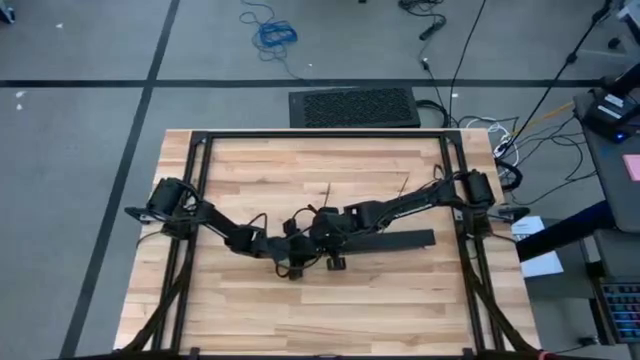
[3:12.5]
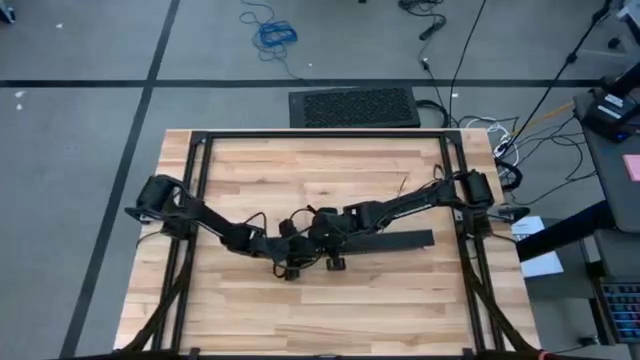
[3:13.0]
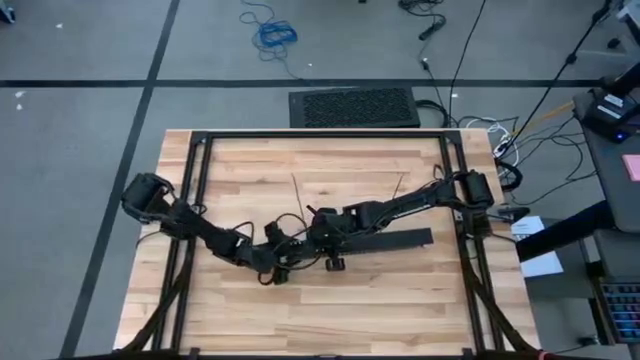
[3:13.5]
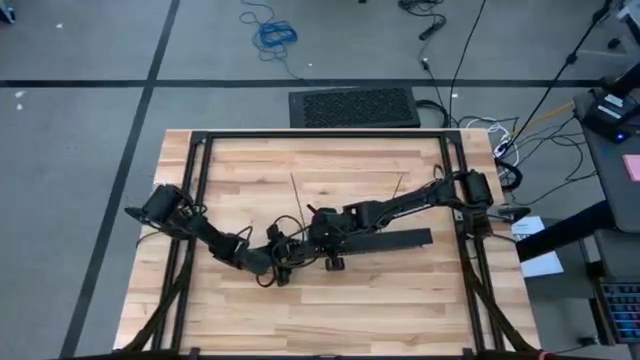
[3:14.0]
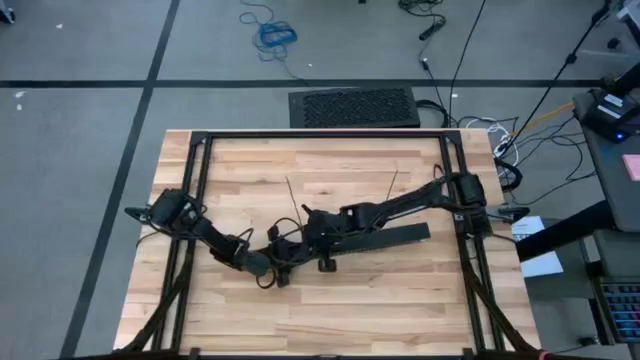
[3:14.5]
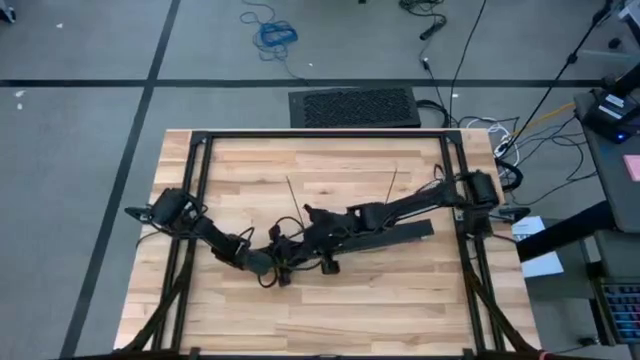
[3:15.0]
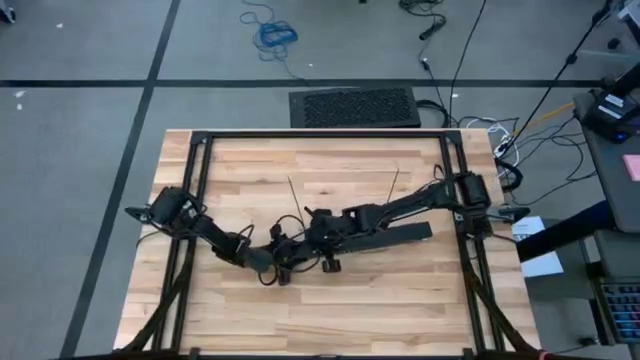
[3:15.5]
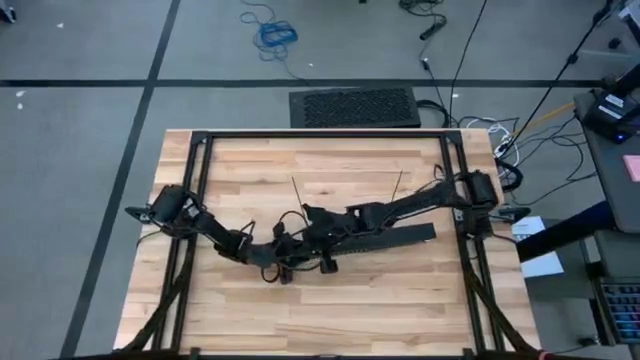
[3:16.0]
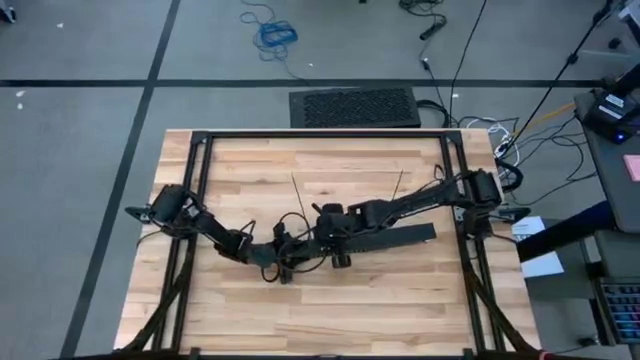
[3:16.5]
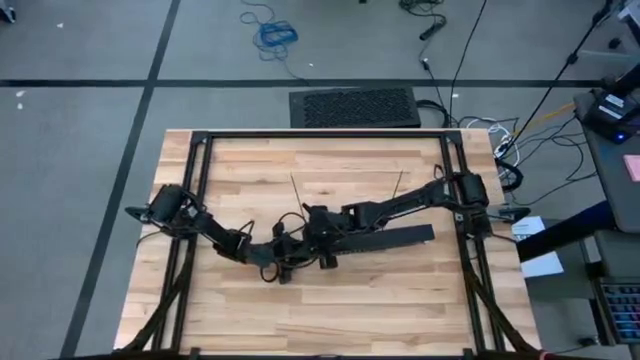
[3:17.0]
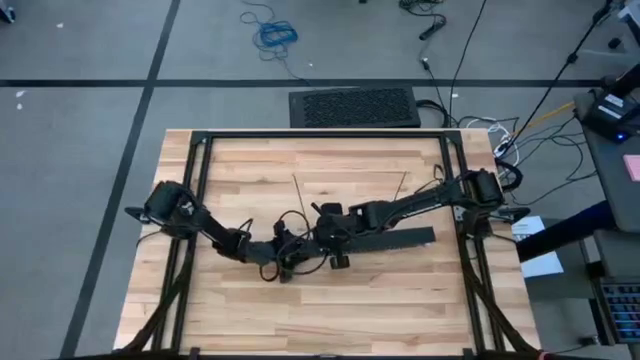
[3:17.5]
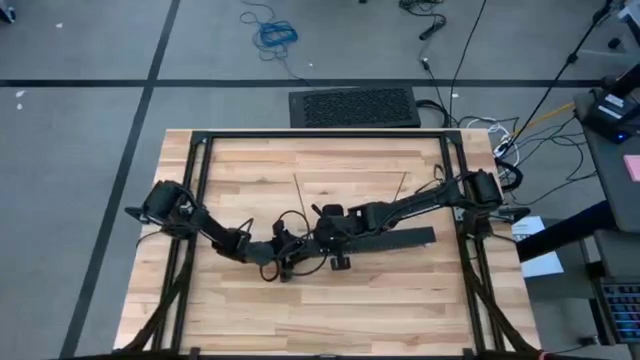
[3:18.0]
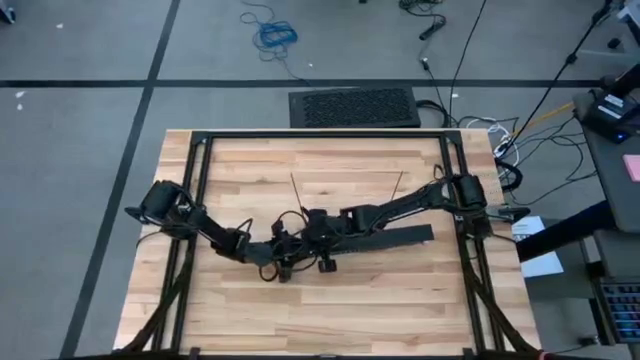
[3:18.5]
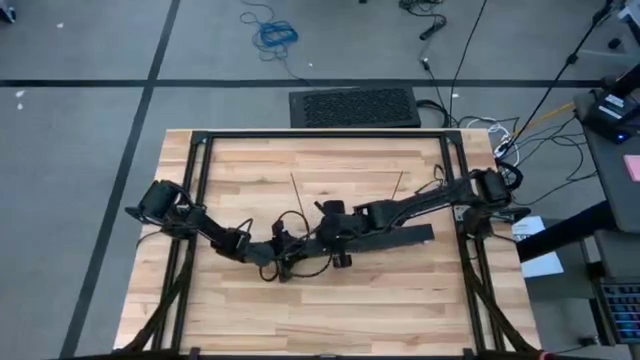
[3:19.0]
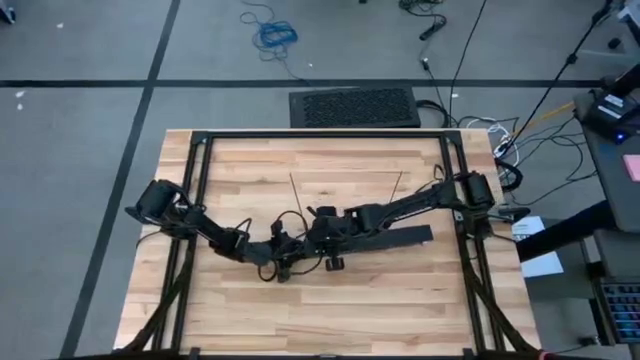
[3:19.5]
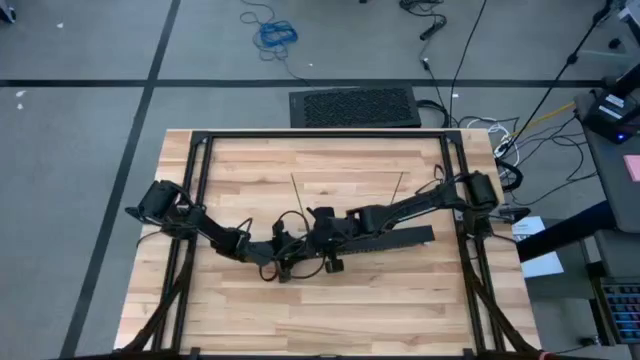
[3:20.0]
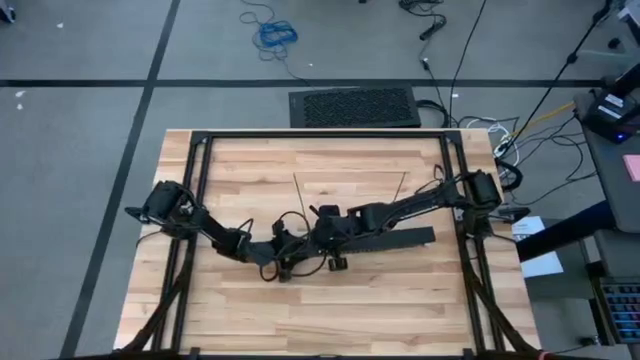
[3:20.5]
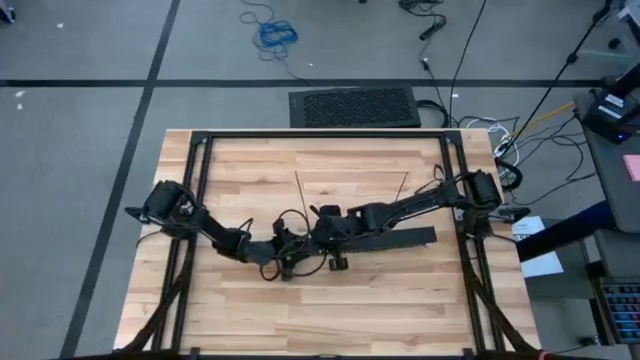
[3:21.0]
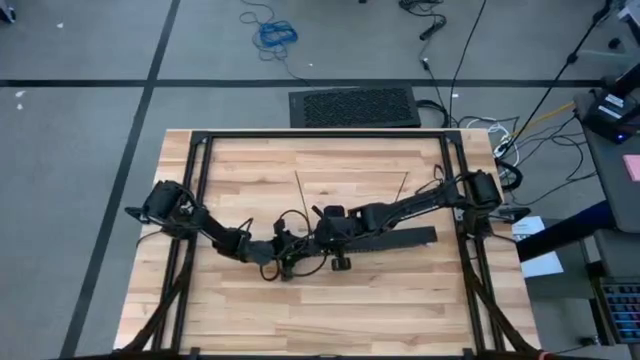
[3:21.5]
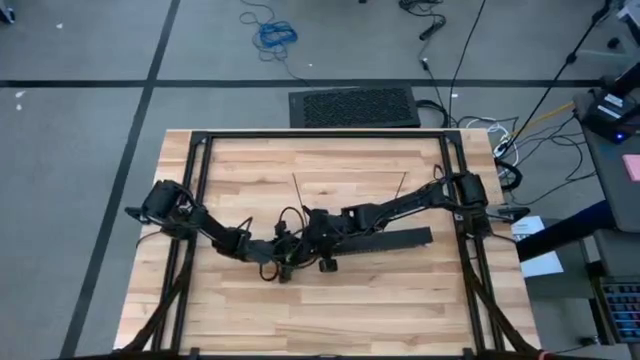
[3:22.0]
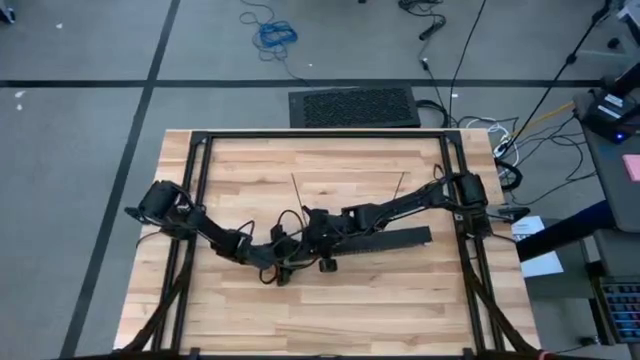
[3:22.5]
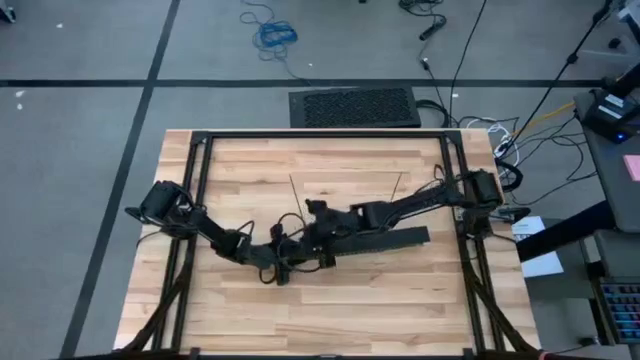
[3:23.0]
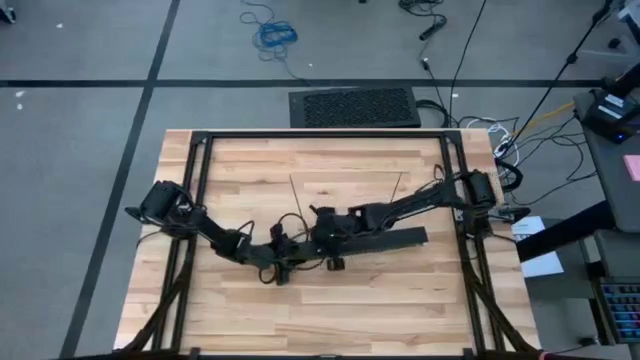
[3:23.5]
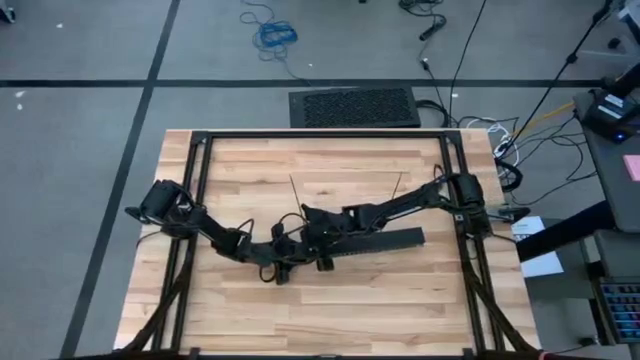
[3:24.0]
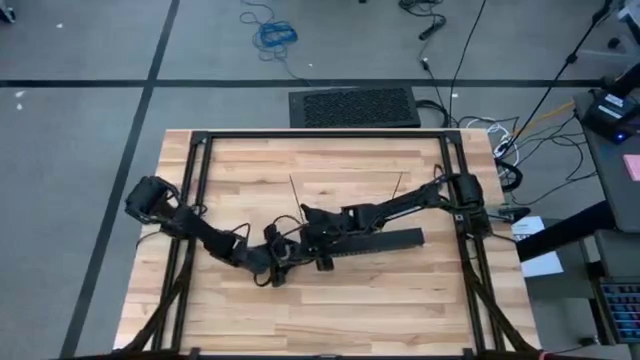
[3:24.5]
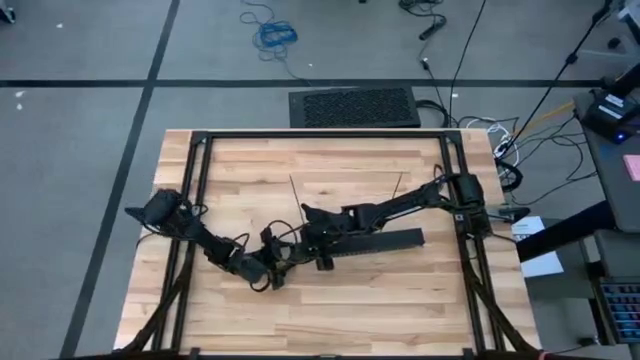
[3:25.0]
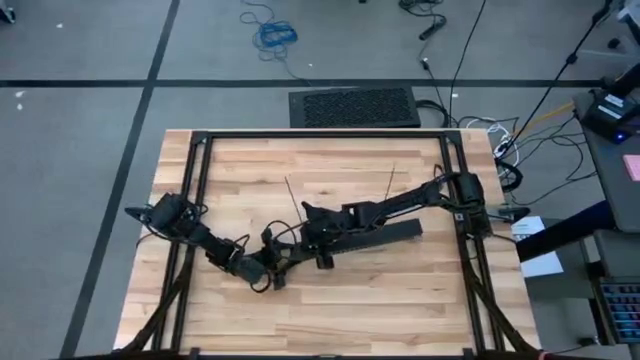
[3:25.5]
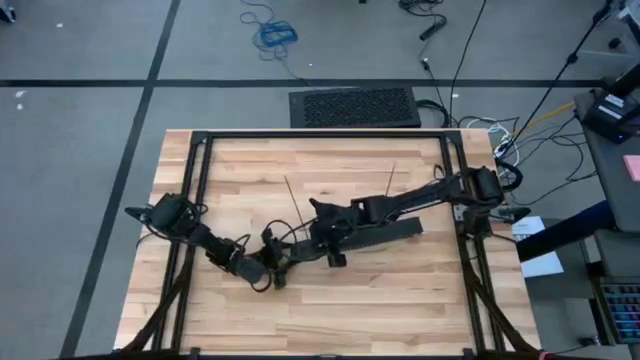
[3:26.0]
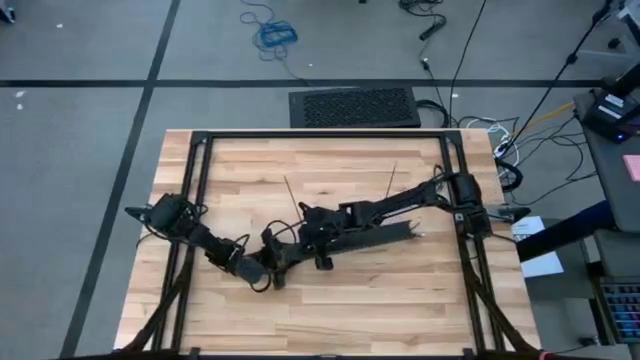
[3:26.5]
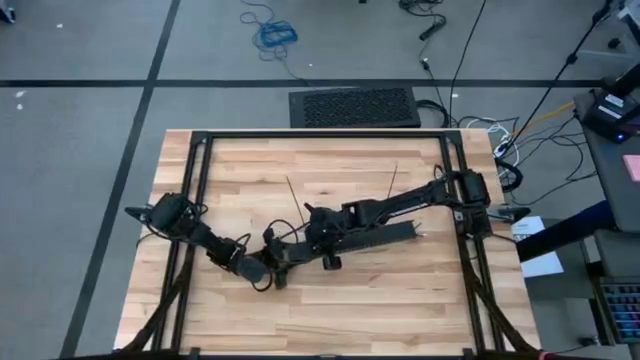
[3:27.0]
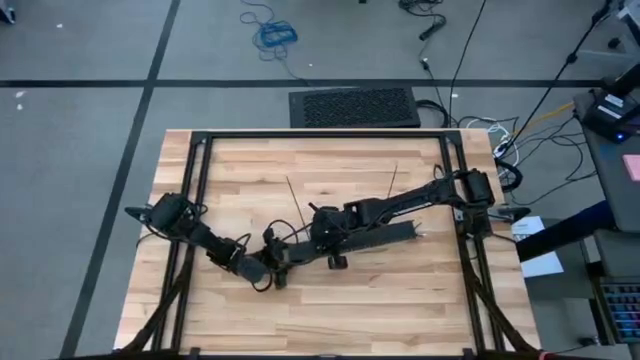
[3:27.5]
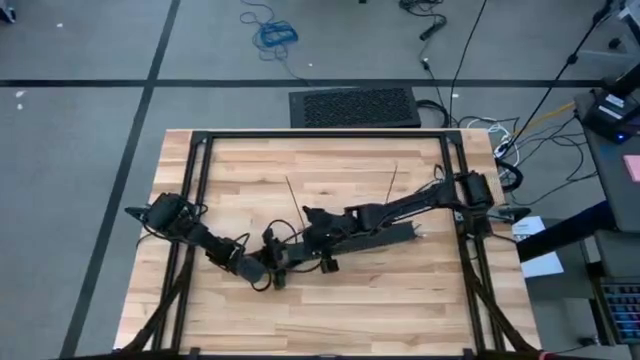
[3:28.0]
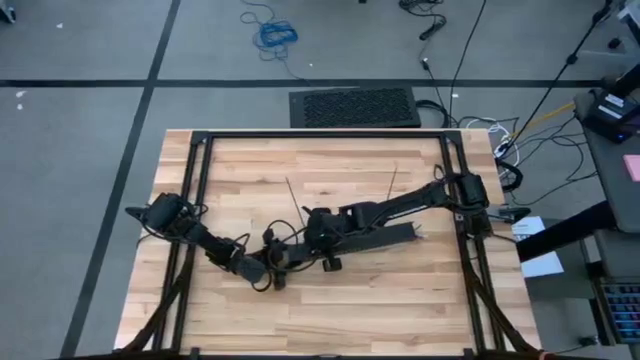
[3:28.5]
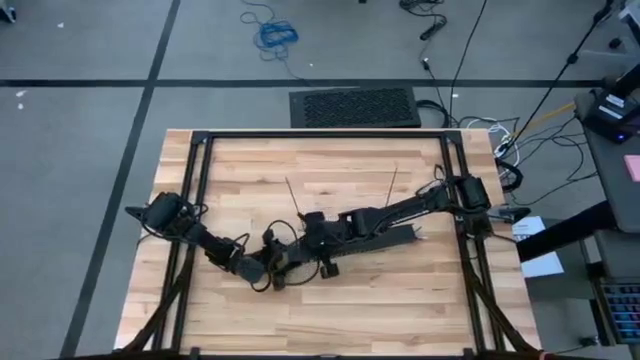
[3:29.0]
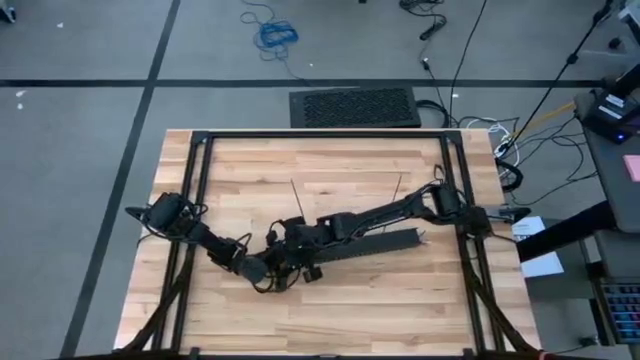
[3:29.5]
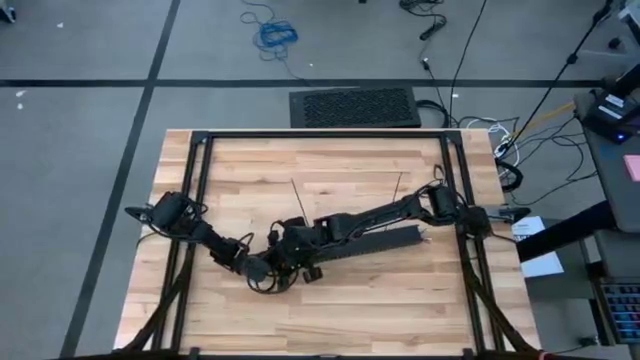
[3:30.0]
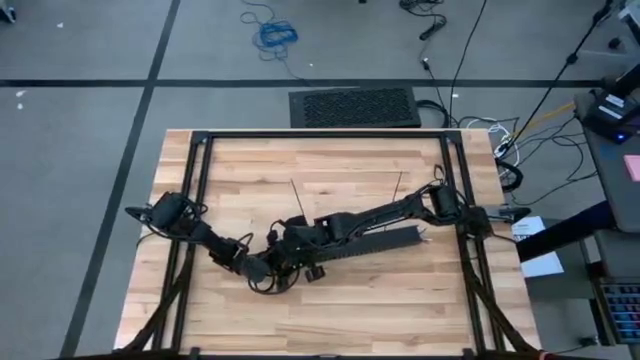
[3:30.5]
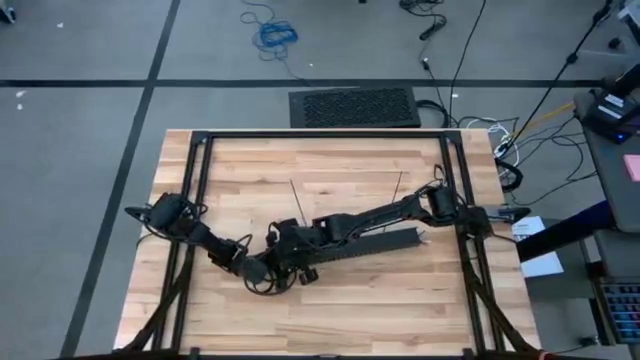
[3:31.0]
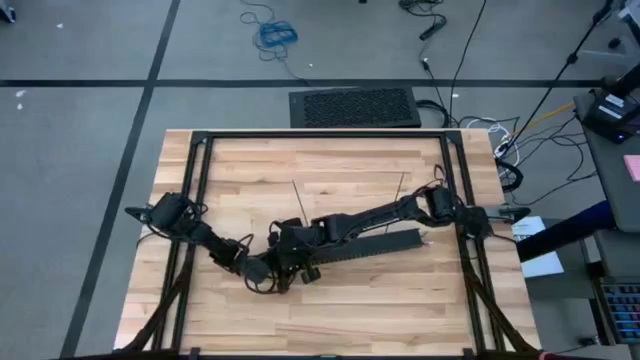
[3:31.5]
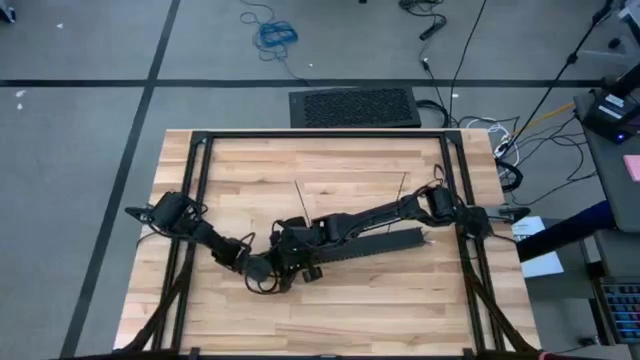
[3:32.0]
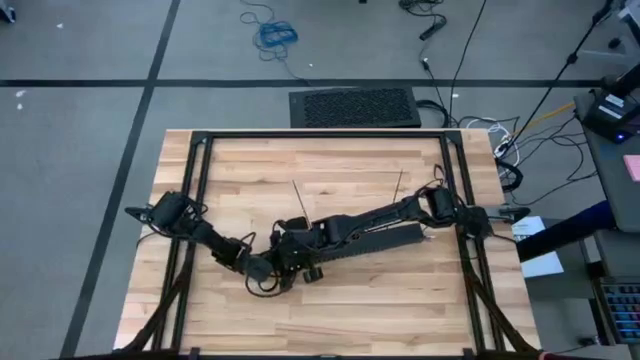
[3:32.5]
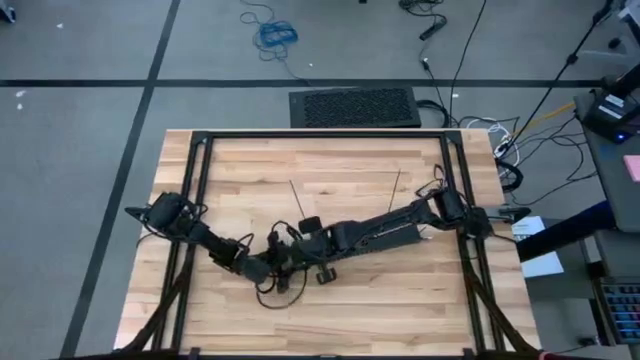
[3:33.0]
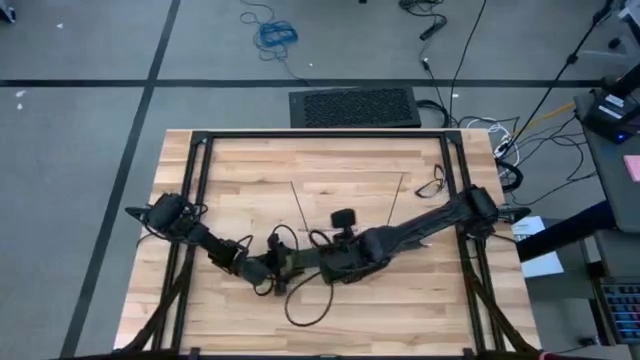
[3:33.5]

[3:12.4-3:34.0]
Task: Ziptie cables
Close the black cable duct
